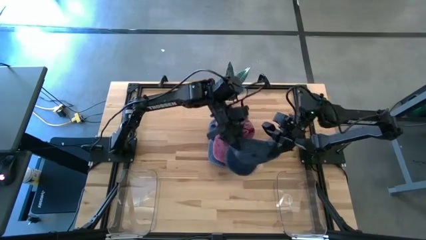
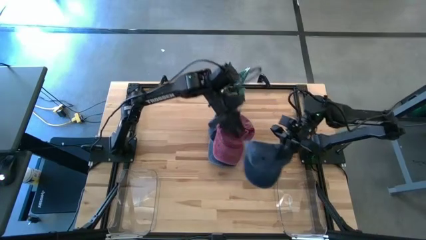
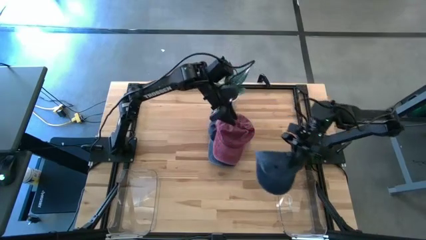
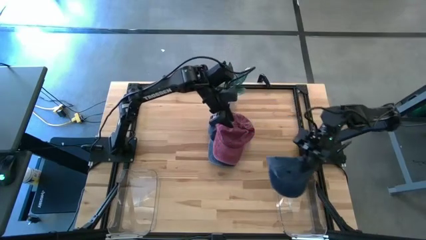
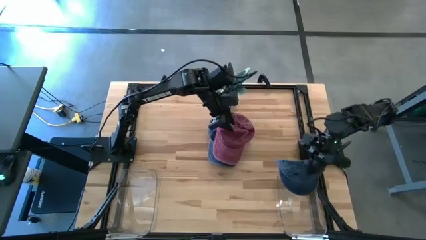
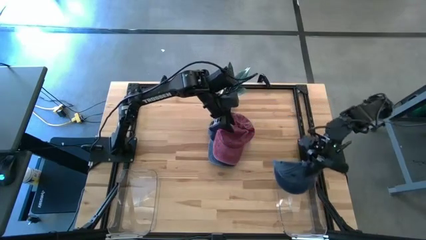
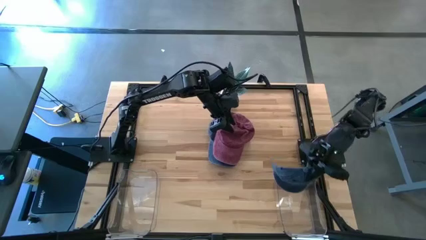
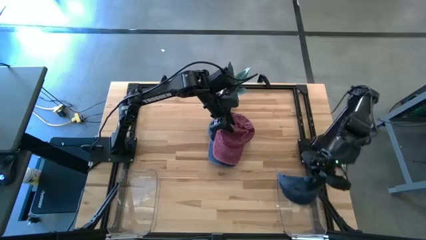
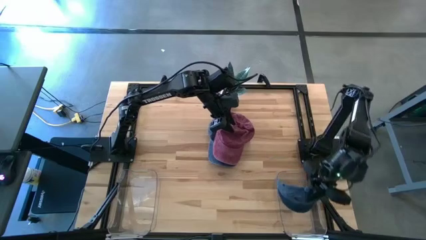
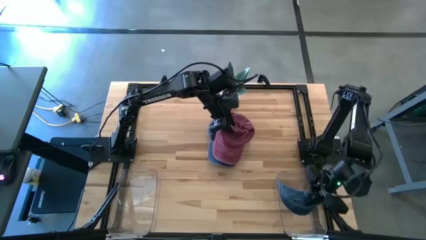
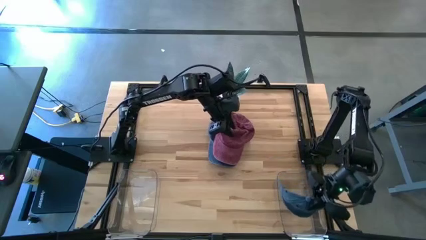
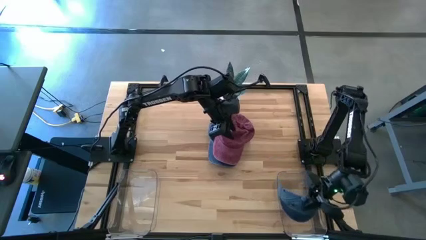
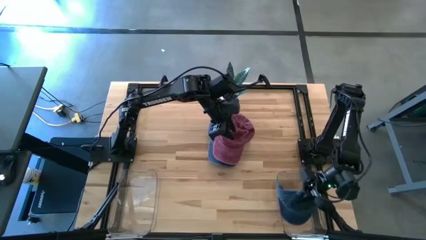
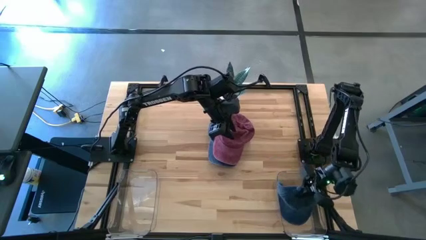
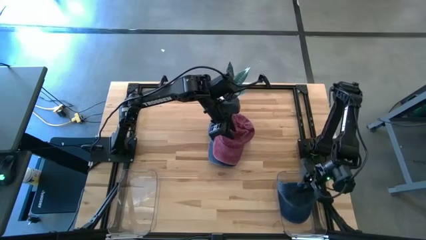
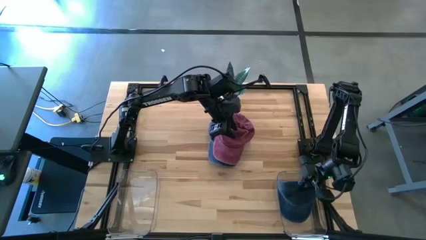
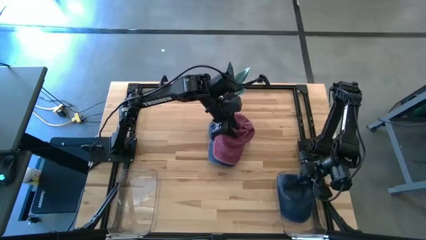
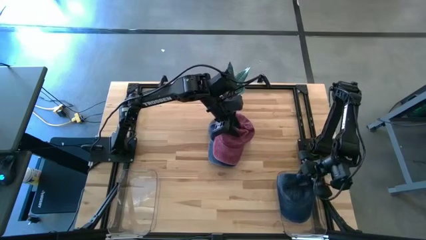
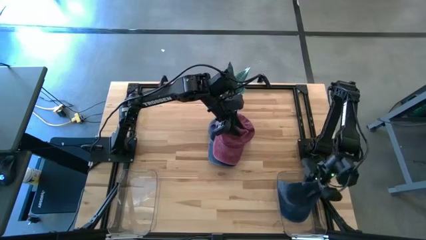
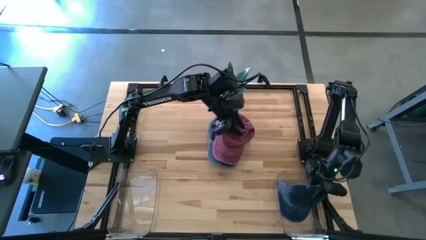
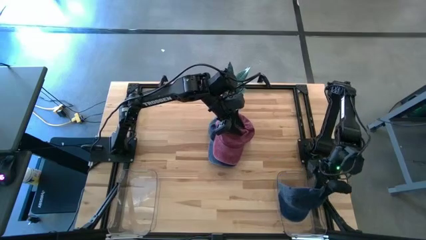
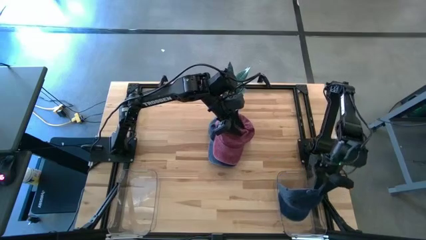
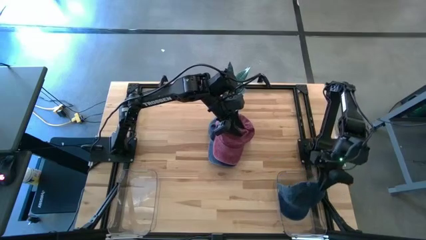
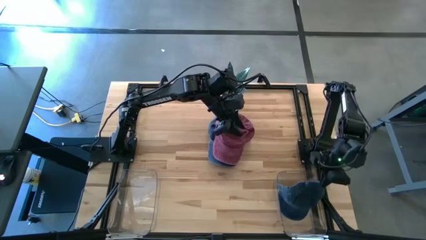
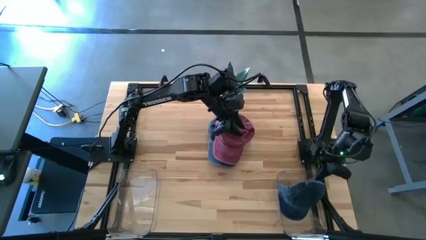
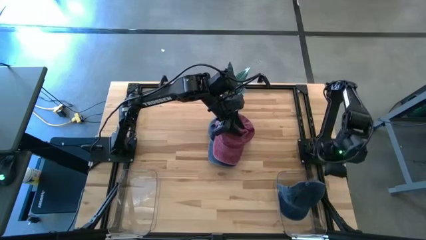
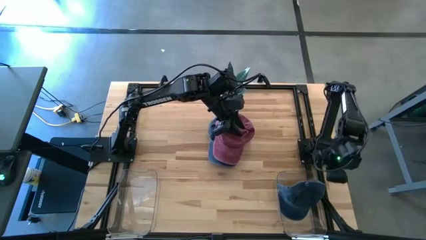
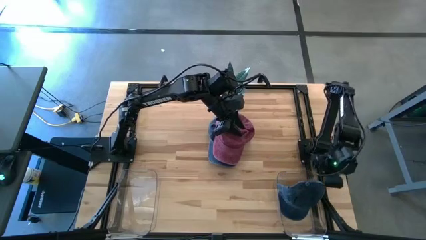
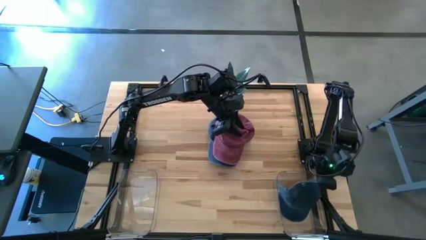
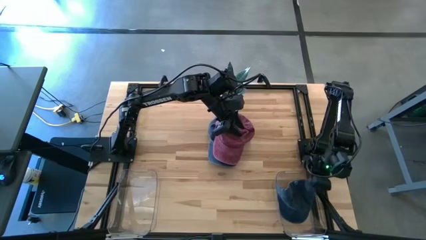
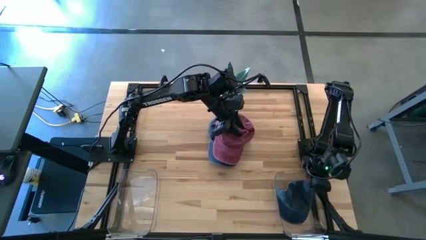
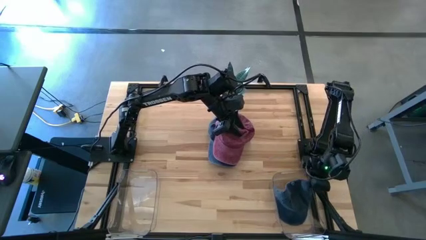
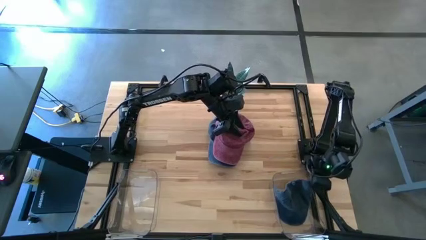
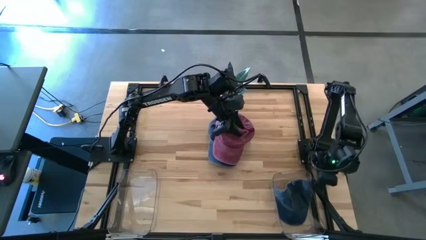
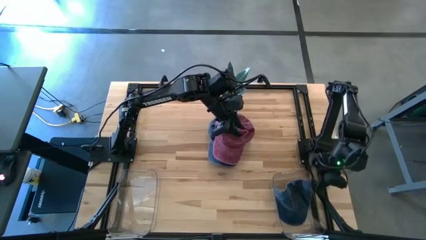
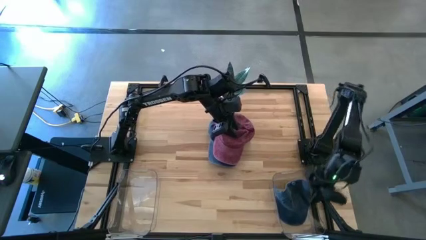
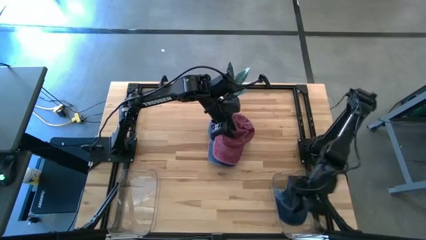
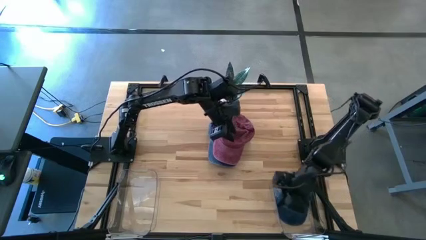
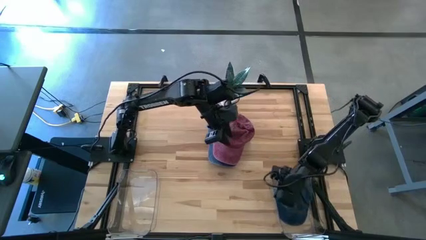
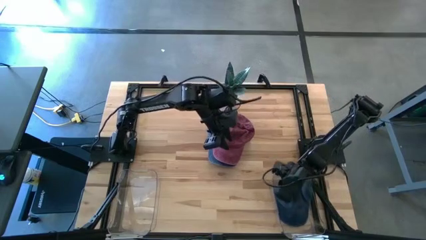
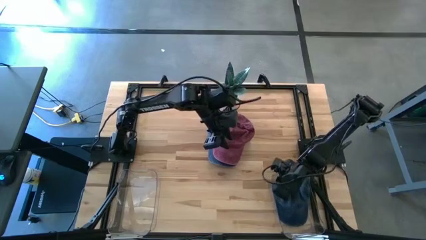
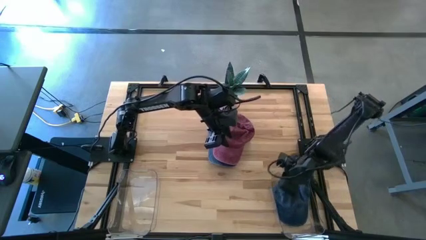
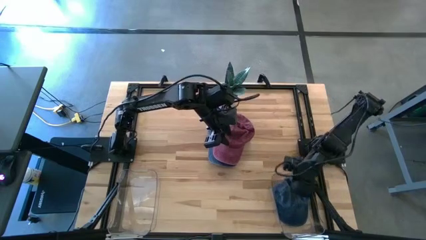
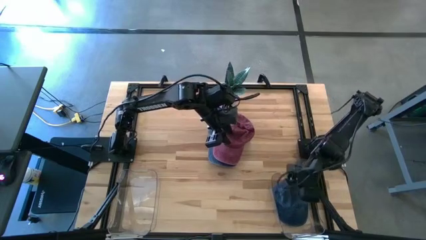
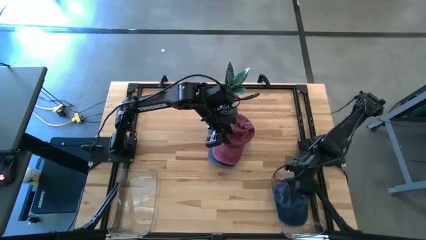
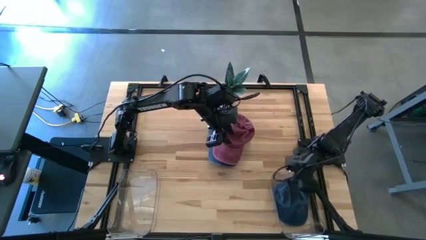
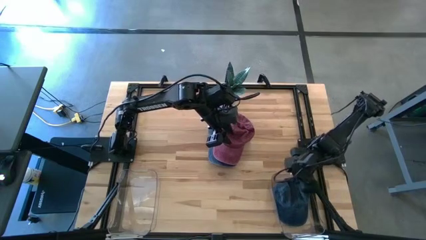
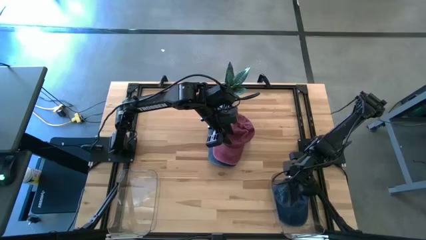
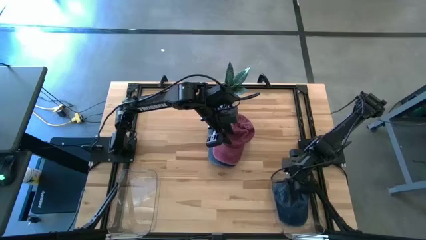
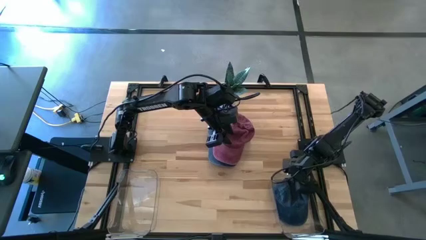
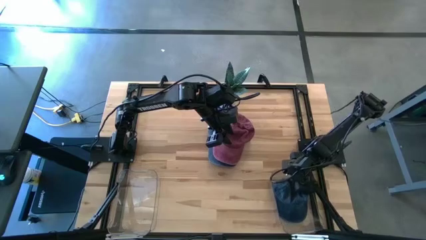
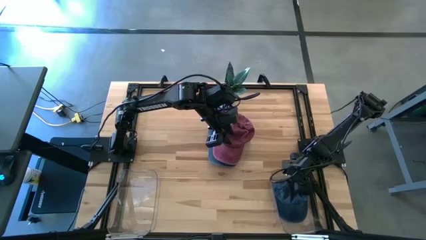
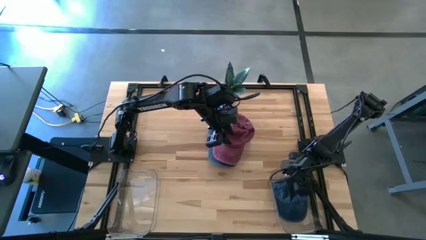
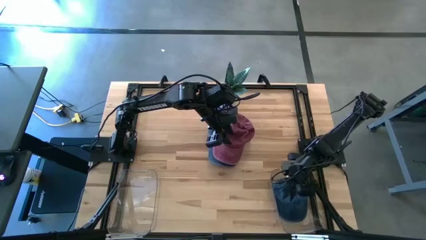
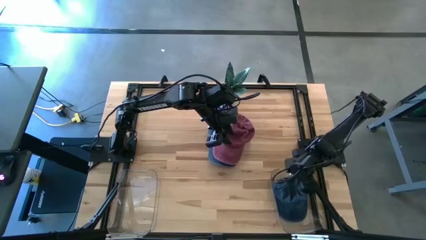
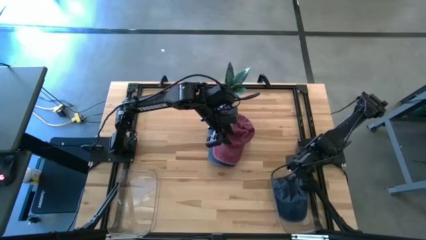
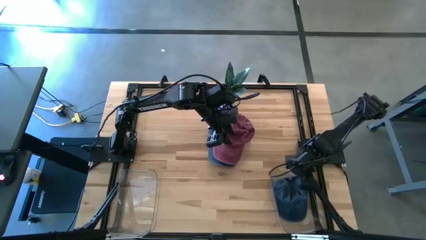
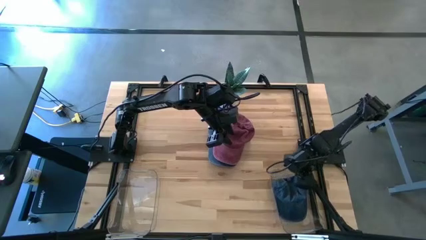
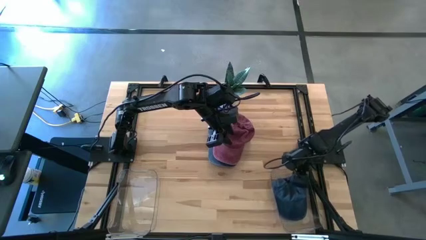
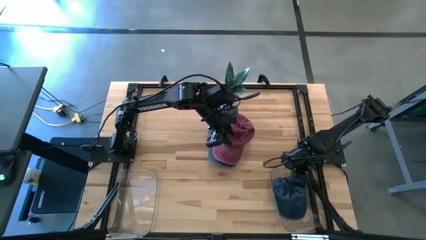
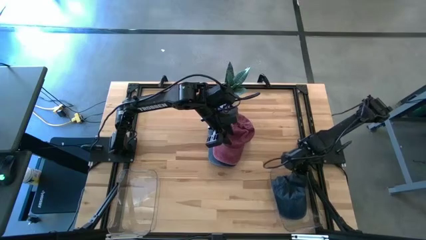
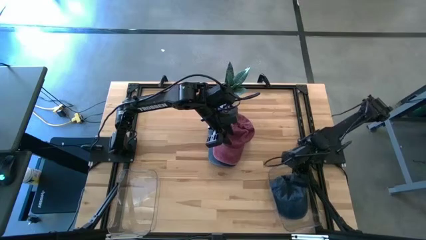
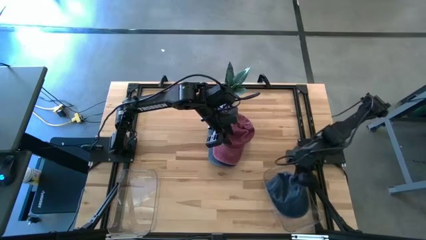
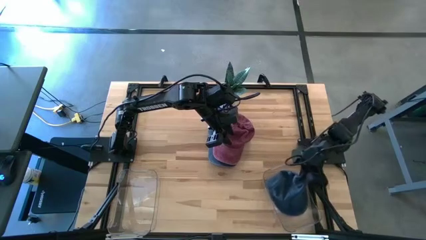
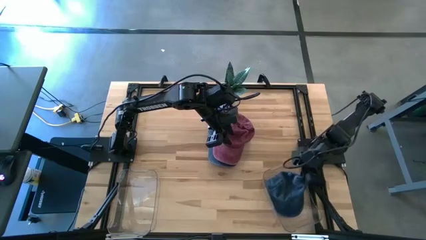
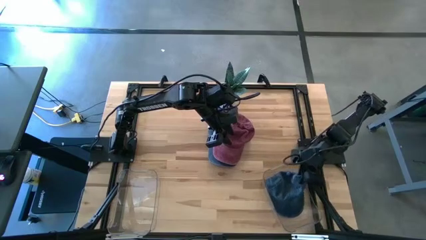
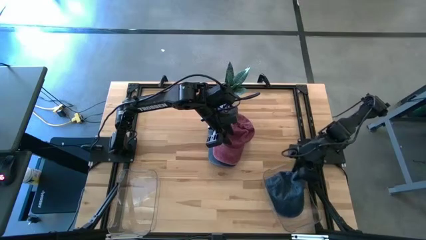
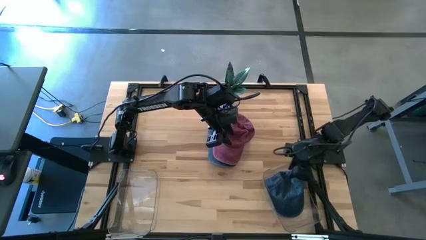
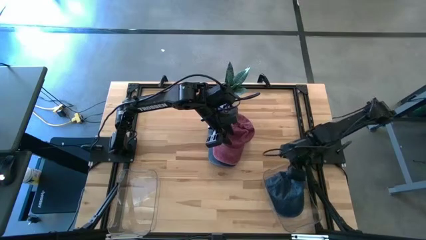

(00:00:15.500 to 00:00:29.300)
Task: Pick & Place hat
Put the blue cap into the right transparent bin
